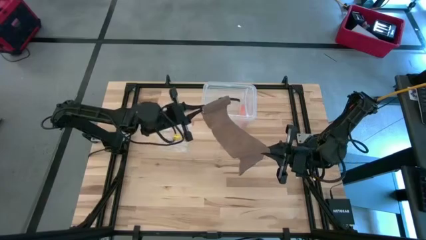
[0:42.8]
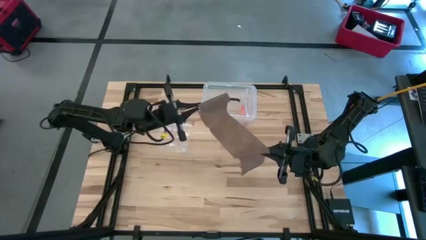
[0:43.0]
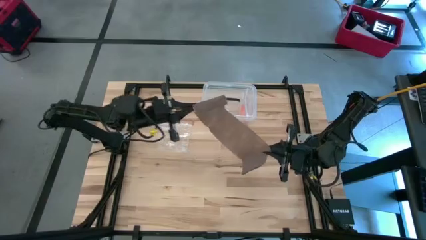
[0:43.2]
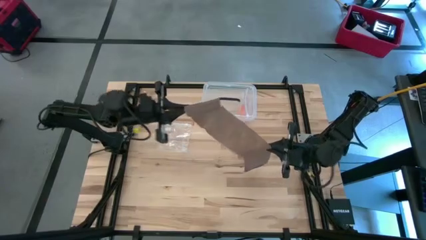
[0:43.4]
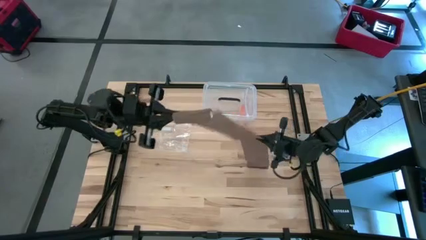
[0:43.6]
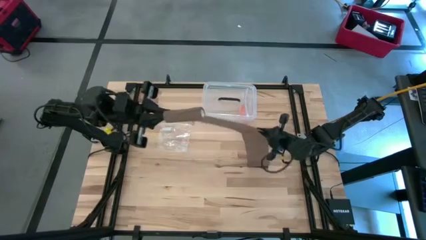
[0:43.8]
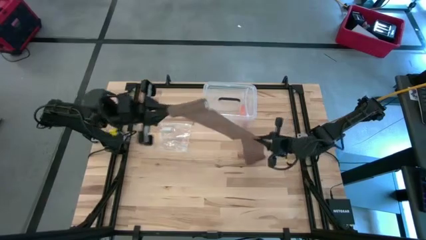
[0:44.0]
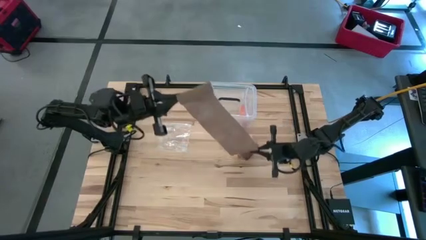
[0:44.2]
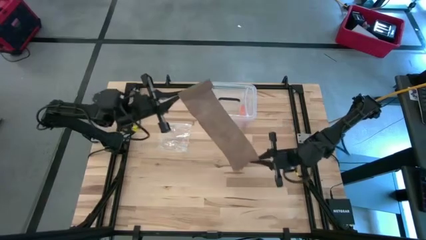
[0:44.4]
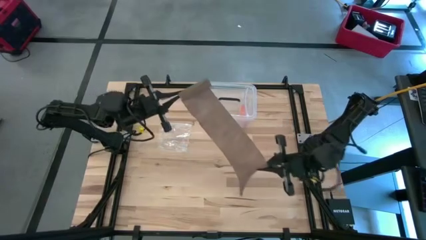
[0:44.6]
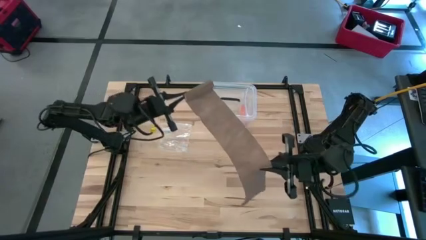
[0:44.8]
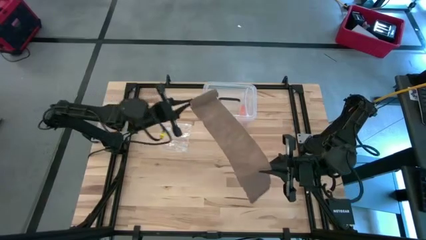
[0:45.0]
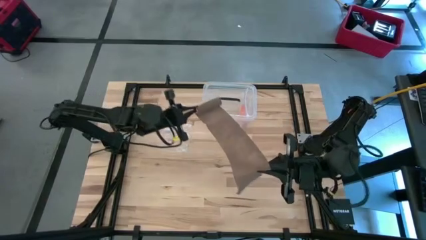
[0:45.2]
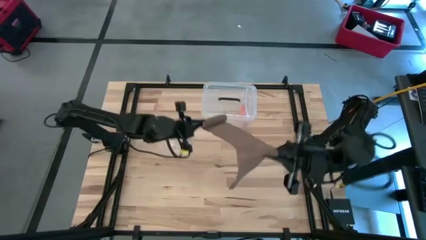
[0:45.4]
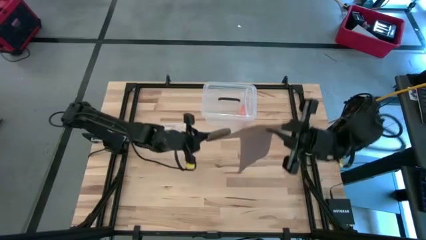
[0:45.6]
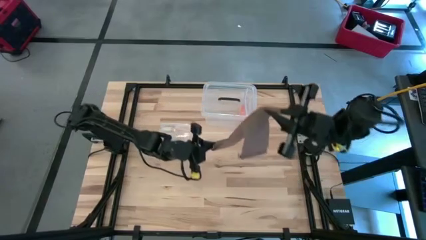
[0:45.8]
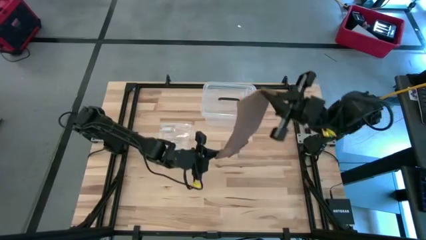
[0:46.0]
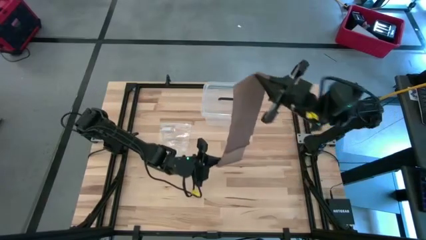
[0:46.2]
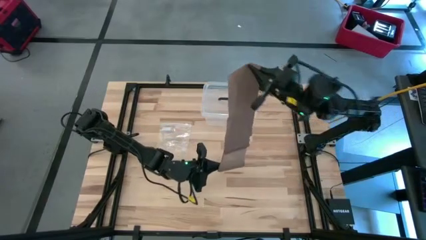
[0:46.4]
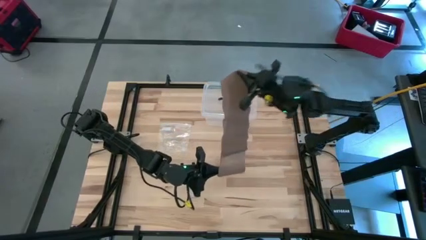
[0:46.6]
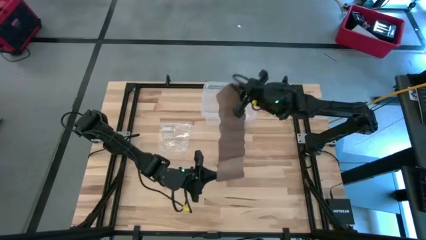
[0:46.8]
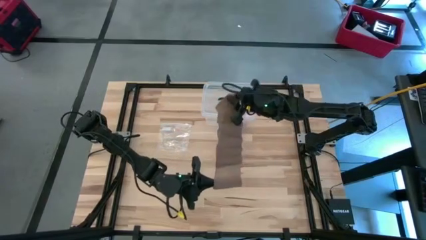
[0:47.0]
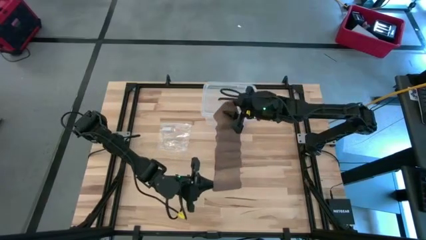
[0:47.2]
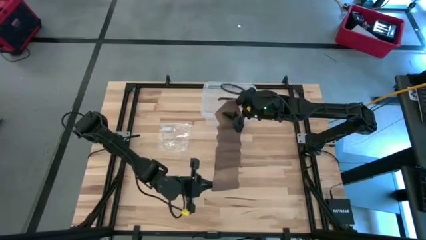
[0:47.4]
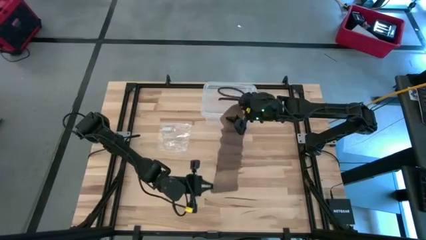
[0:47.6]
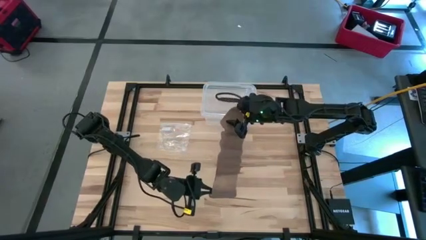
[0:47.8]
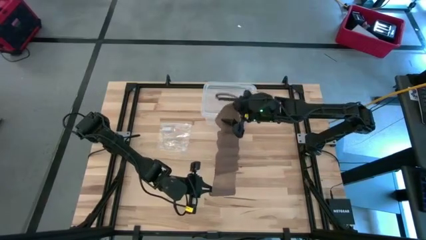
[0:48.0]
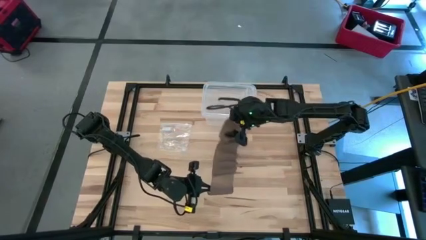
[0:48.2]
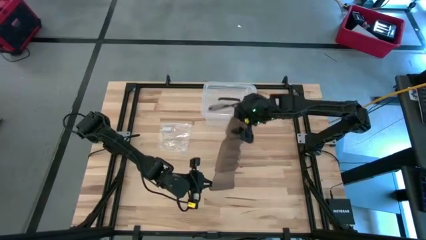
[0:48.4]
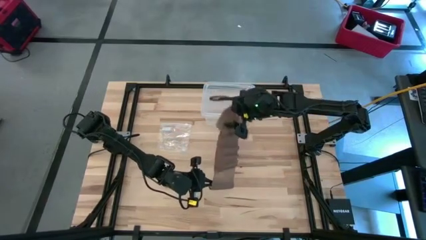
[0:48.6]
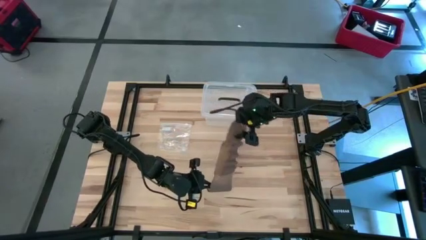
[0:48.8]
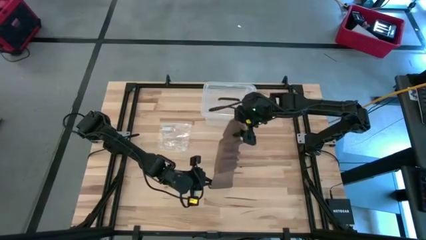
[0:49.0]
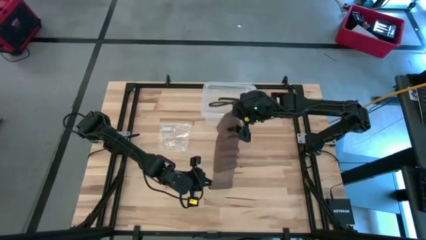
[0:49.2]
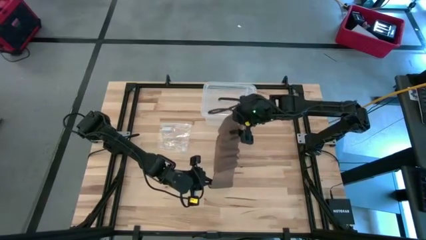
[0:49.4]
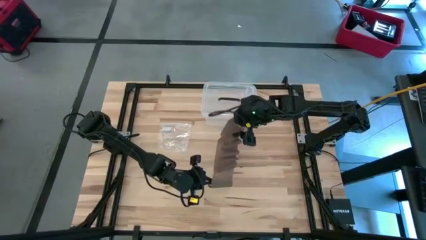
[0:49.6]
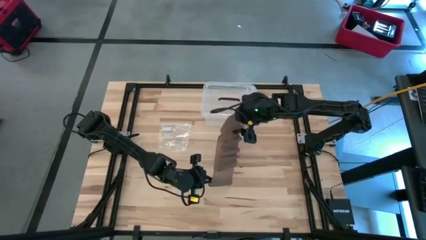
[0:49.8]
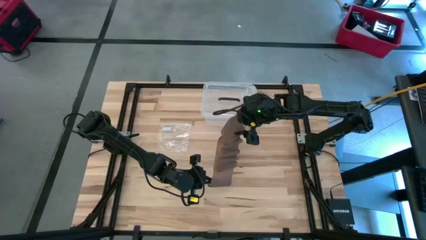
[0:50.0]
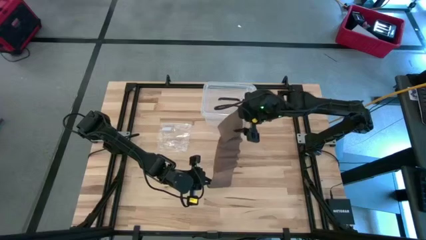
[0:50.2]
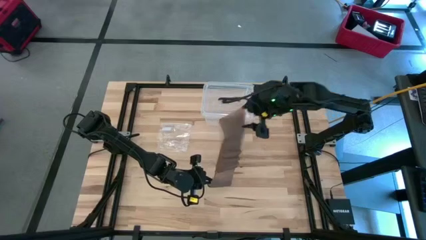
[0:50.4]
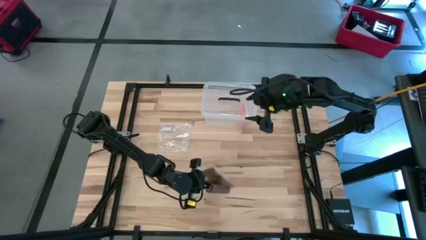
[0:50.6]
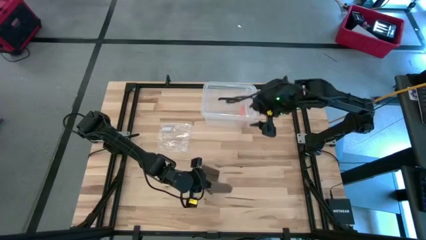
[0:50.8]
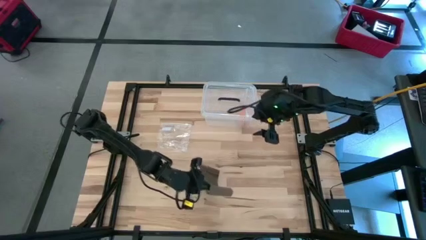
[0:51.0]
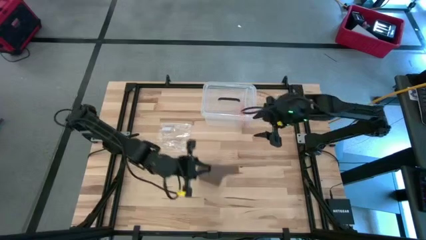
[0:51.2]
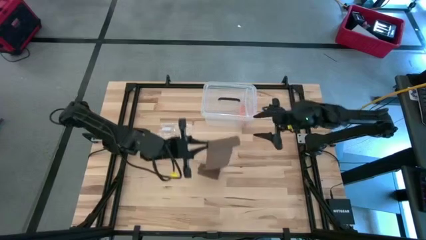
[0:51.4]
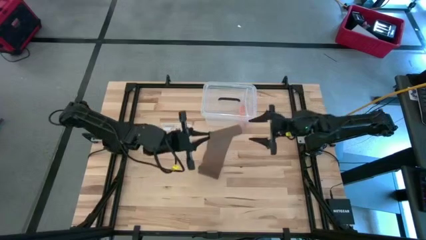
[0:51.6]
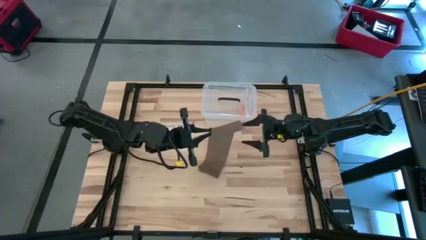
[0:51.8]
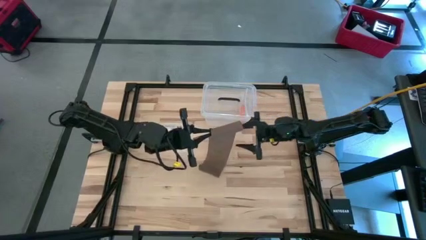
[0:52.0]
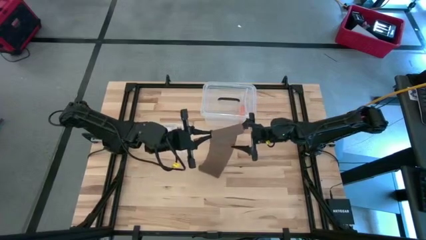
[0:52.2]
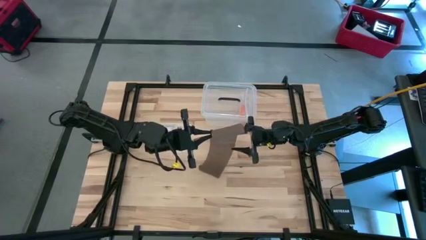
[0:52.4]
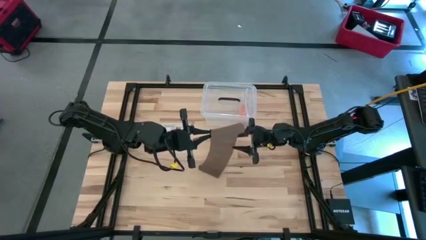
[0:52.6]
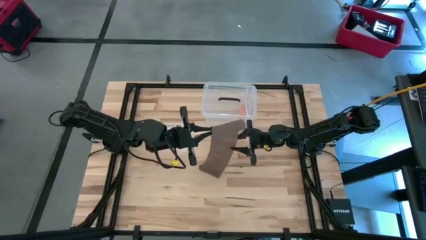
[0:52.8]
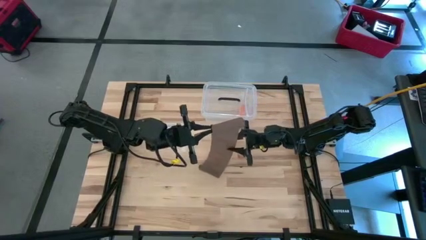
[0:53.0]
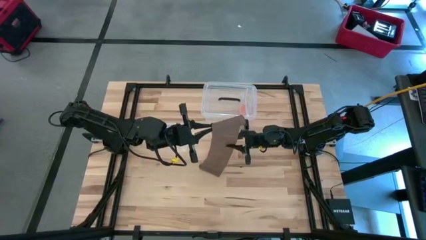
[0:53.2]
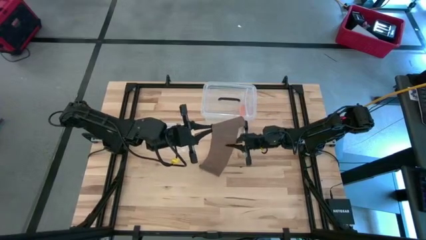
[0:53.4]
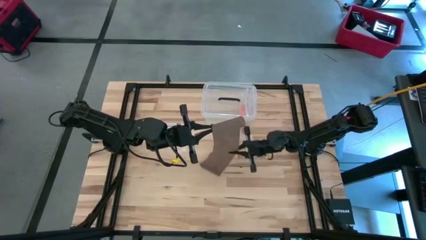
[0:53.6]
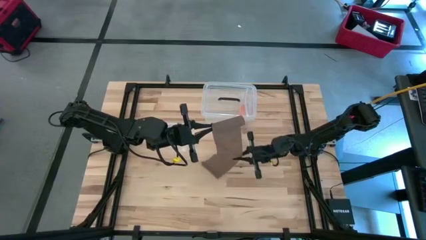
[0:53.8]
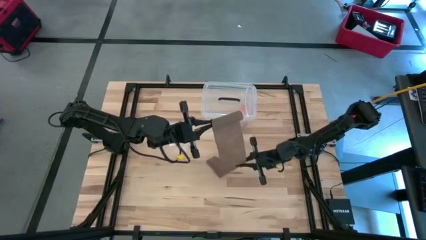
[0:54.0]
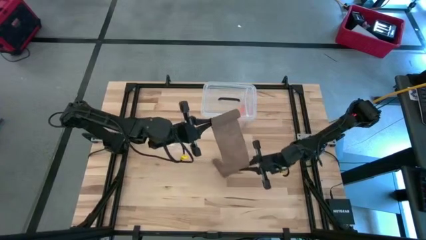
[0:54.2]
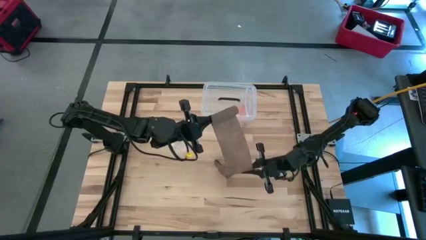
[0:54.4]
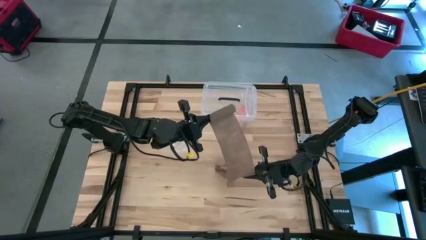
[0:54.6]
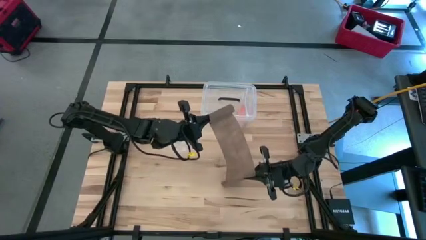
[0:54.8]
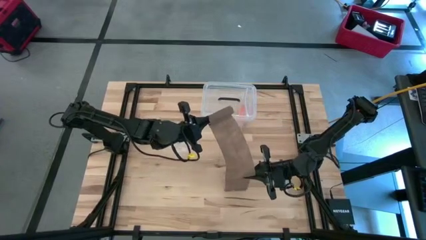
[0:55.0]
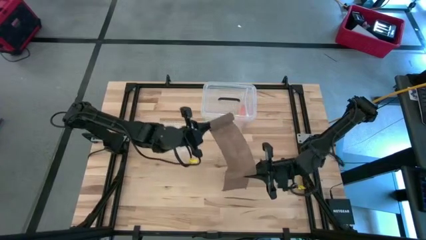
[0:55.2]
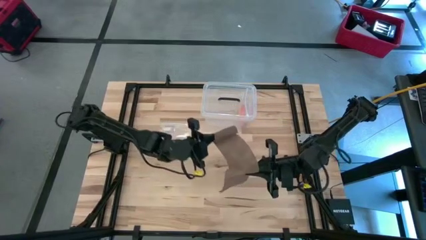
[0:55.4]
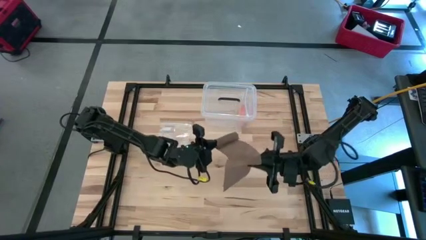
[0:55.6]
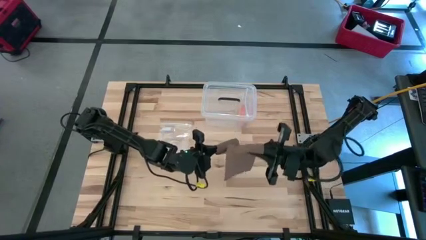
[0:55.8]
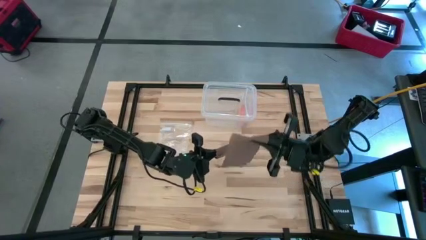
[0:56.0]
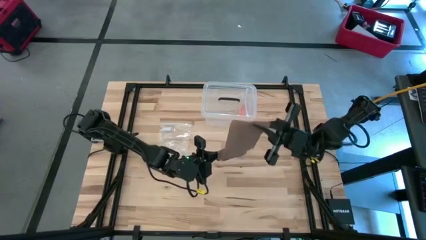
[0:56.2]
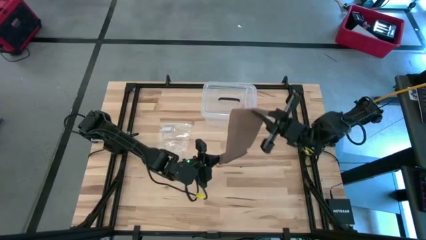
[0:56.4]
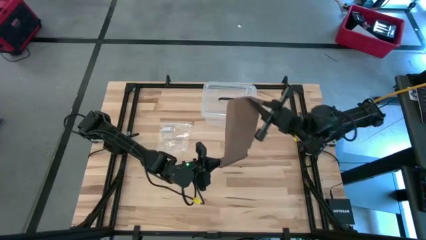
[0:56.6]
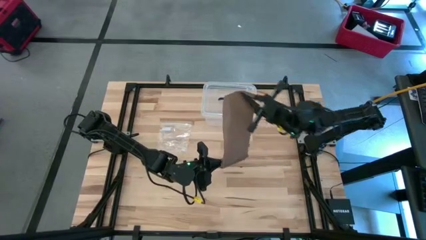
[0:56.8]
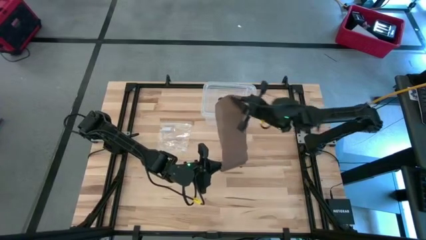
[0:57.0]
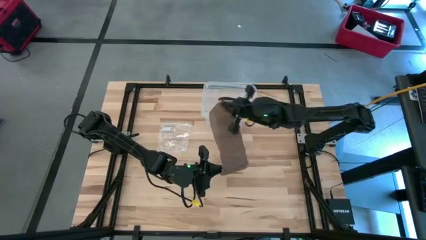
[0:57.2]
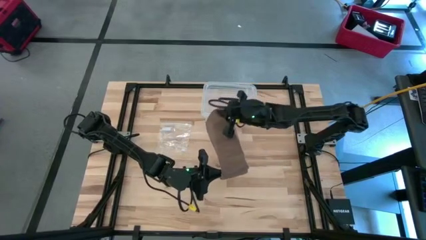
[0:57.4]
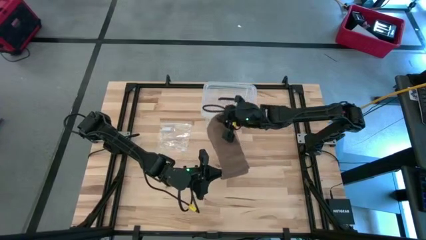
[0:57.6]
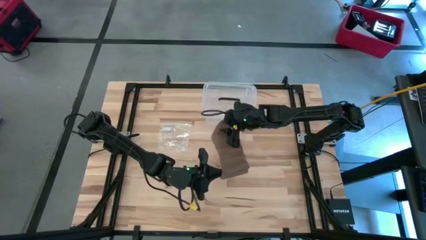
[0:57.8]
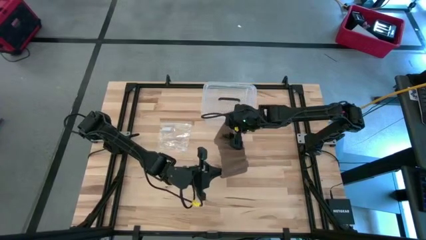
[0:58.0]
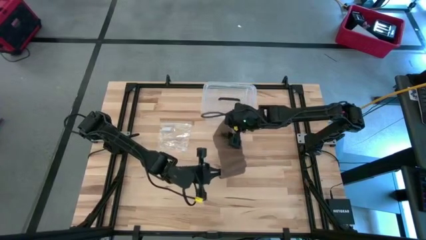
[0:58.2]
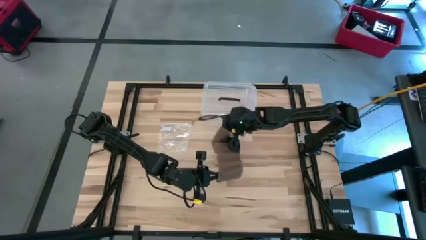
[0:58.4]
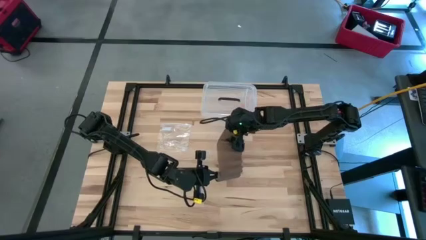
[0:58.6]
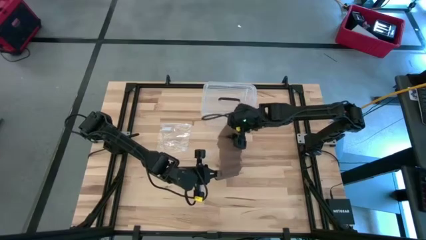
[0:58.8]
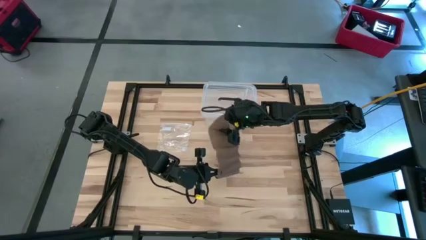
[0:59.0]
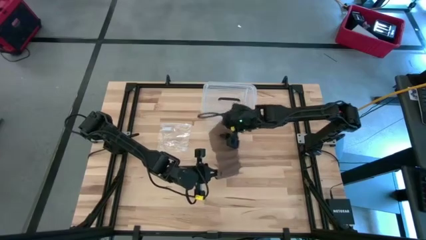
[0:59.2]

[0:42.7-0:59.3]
Task: Roll bandage
Roll the brown bandage
